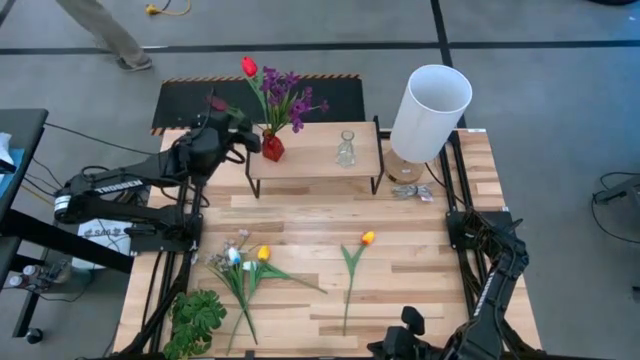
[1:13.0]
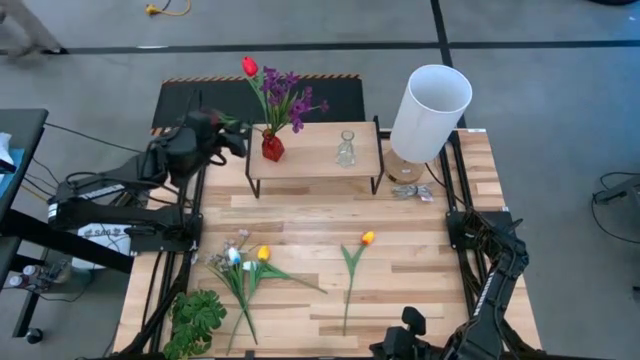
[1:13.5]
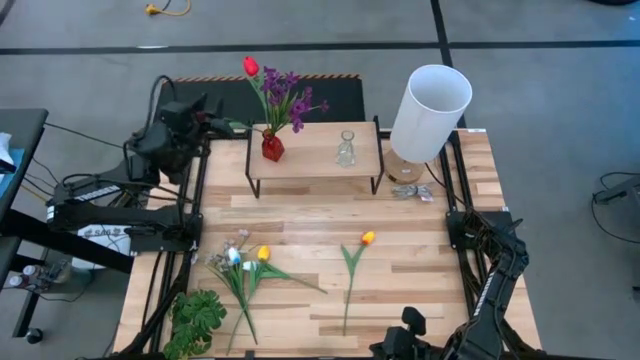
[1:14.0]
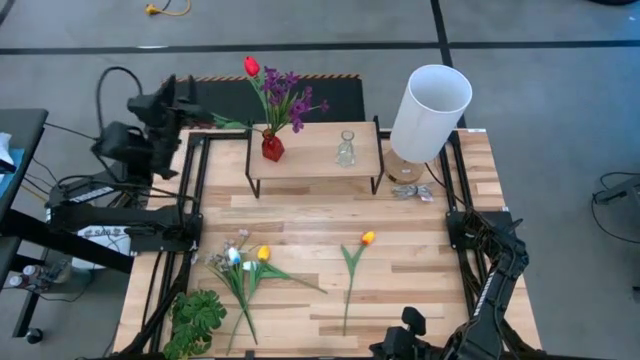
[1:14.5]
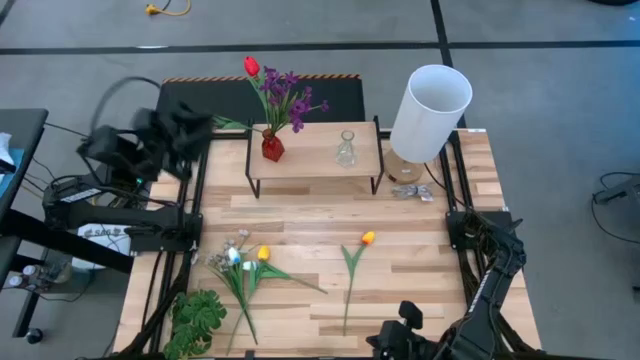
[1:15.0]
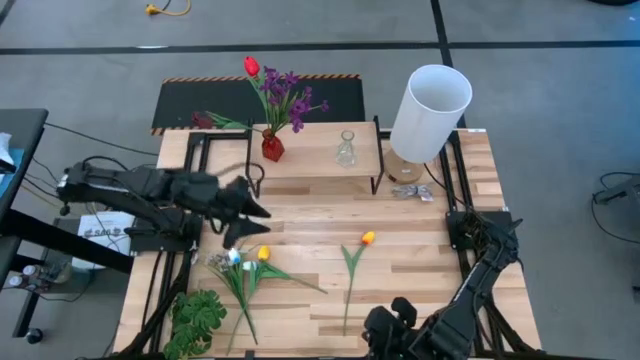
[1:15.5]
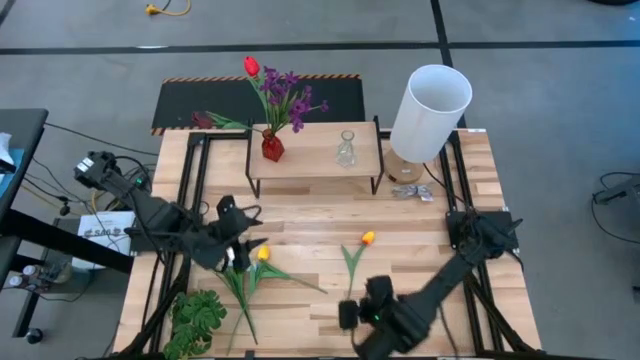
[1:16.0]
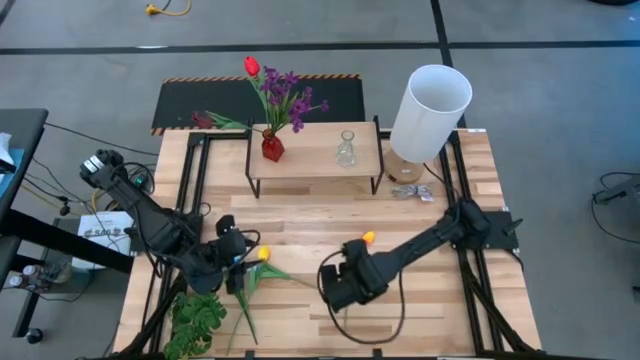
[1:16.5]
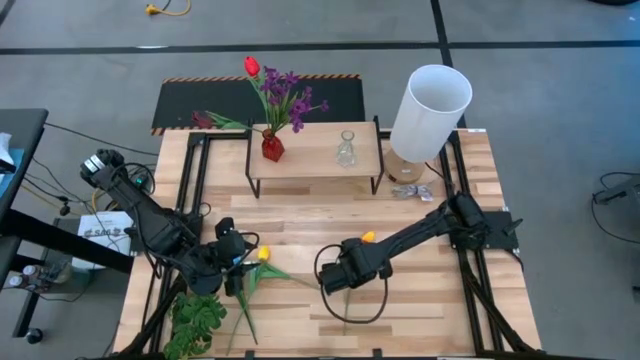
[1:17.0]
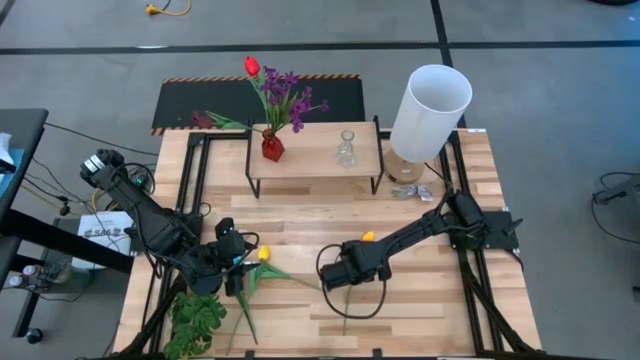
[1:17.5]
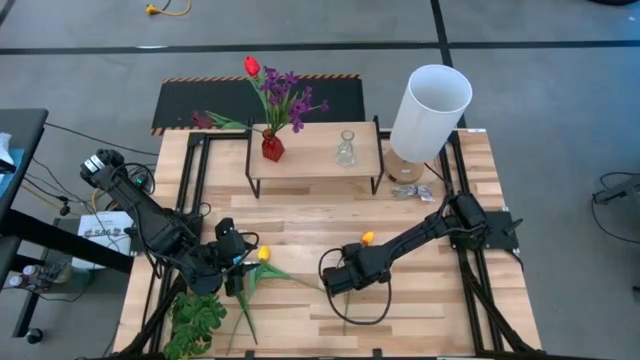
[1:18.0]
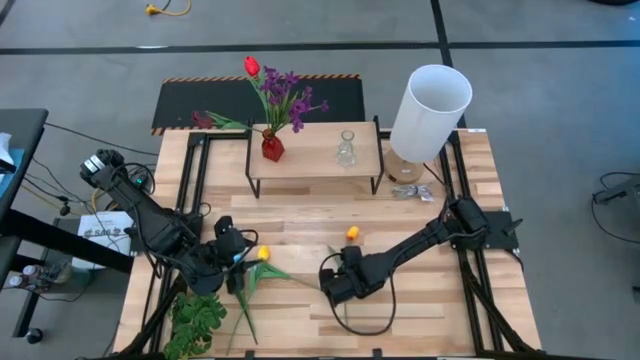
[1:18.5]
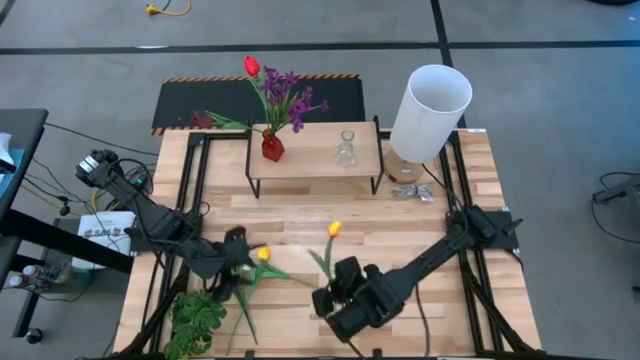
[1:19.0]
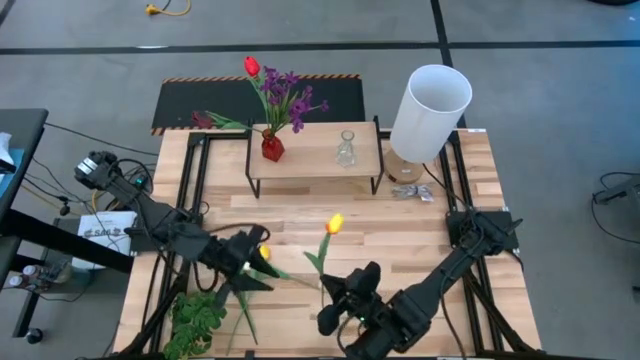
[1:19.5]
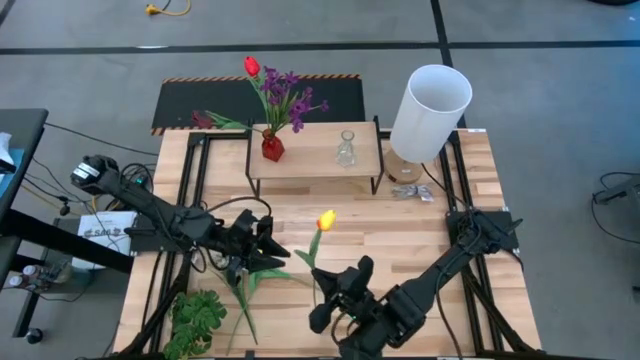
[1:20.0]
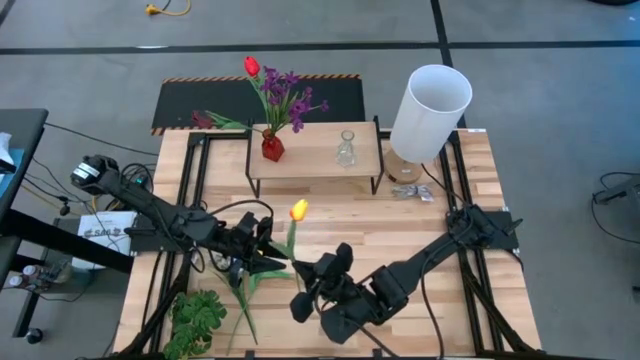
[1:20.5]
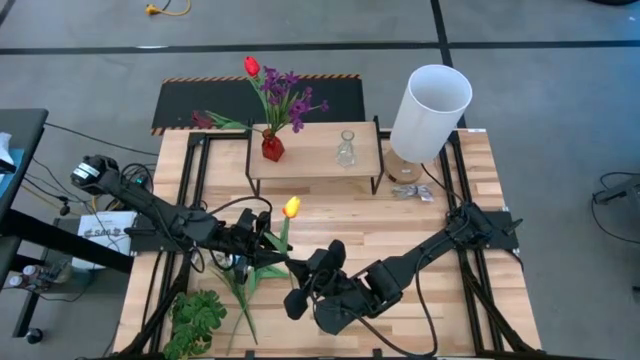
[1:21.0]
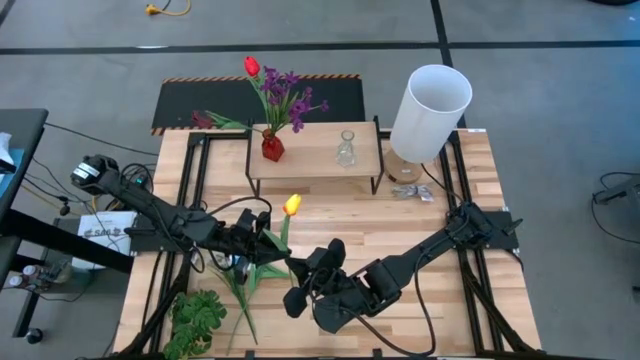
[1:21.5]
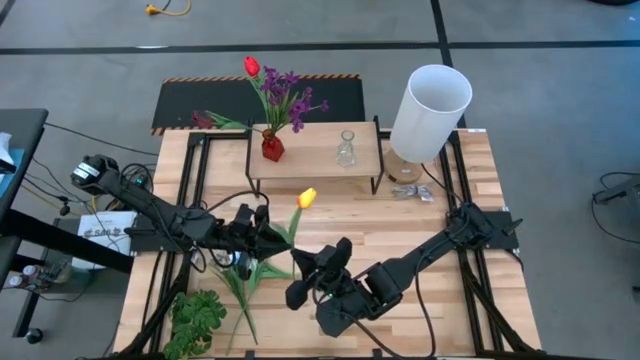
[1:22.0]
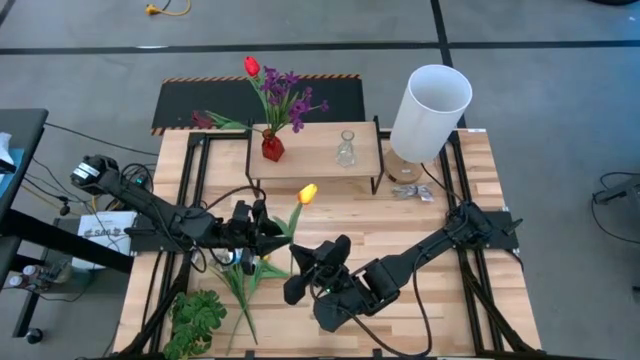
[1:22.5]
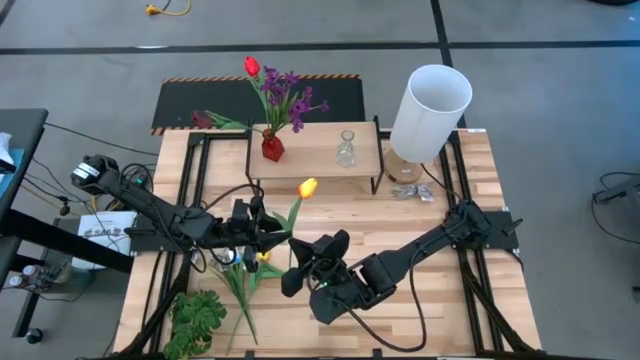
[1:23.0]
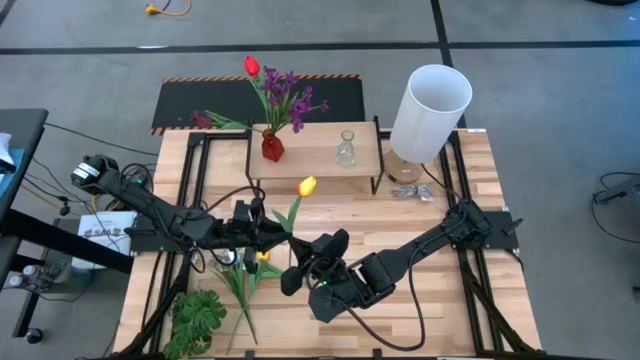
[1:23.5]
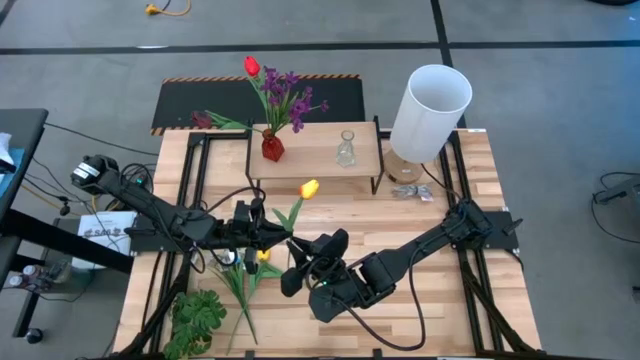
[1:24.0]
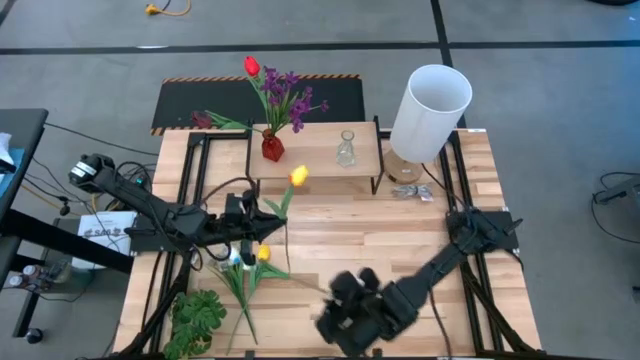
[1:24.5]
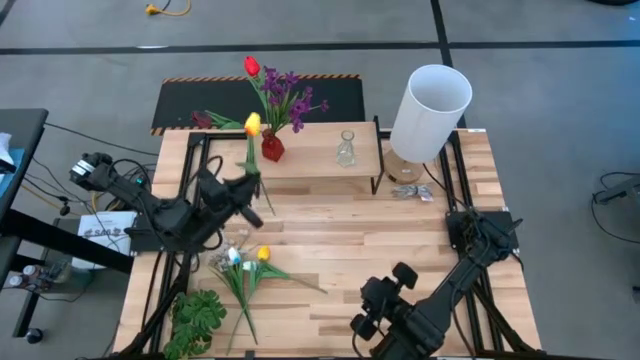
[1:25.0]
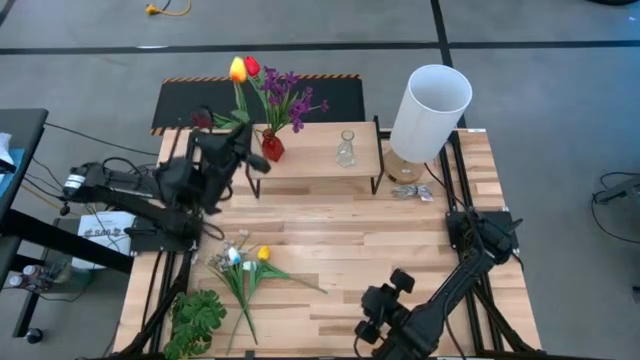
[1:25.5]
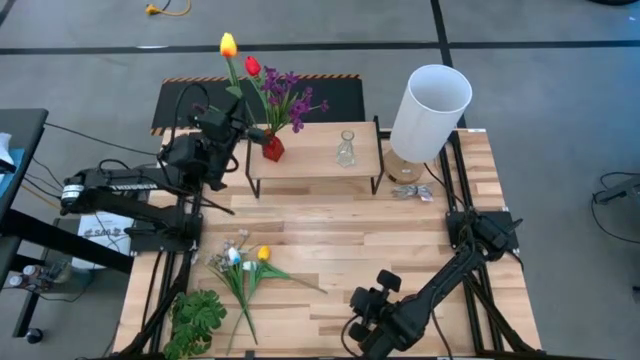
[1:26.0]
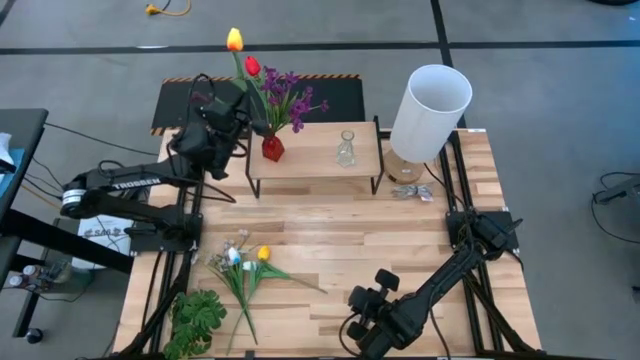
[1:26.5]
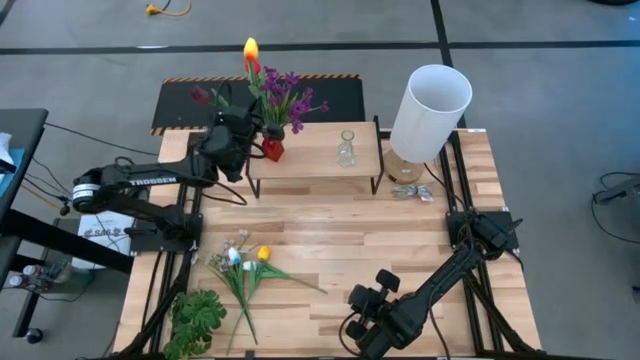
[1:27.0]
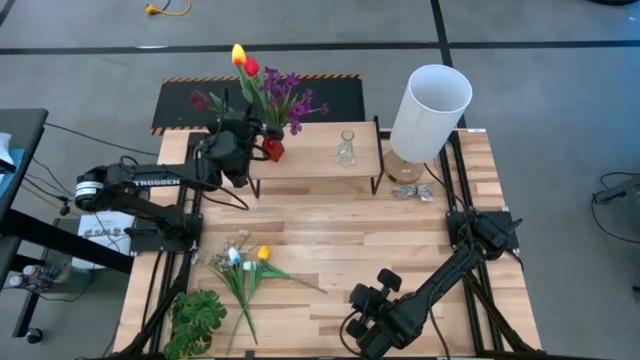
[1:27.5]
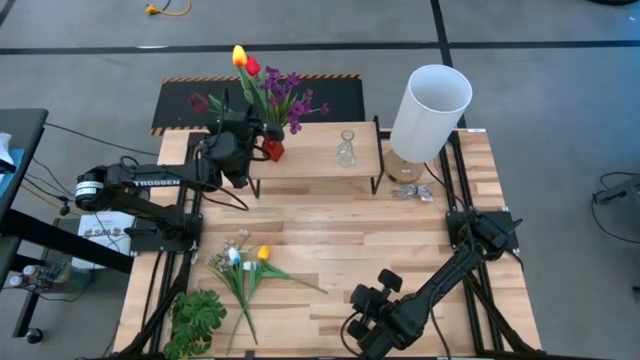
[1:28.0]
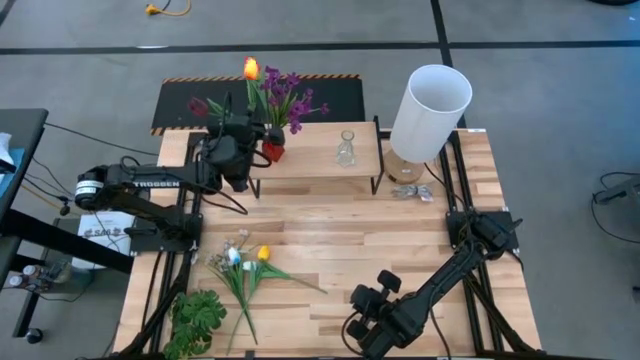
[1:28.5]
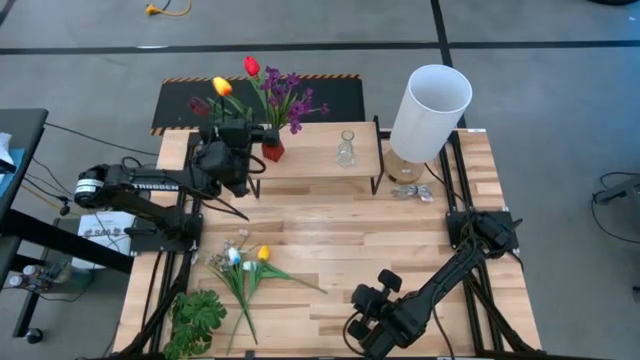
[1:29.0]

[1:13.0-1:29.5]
Task: Pick and place flowers into a vace then onto a shelf
Put the right yellow flower into the red vase on the shelf

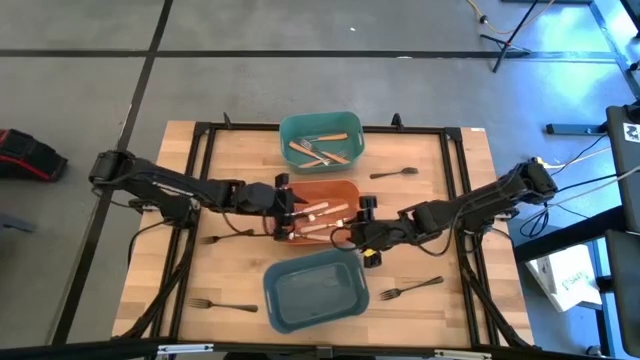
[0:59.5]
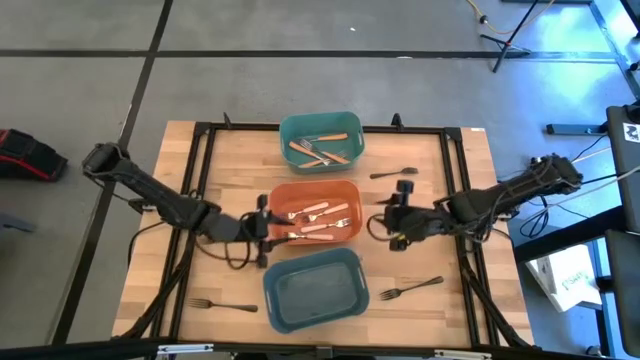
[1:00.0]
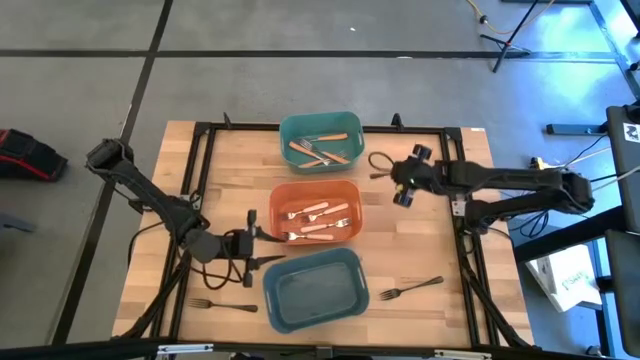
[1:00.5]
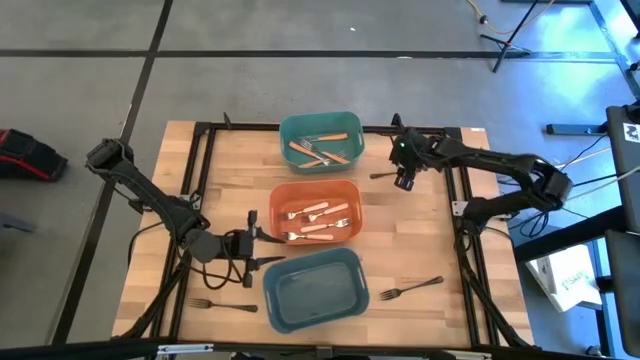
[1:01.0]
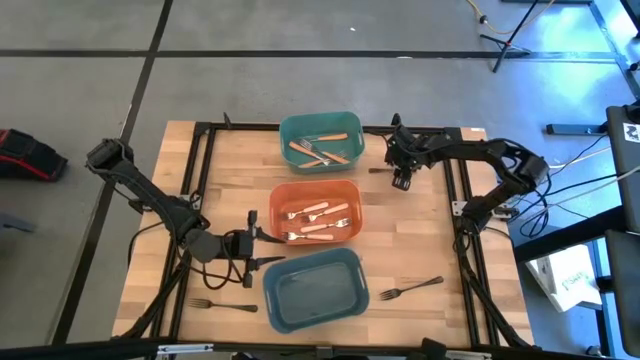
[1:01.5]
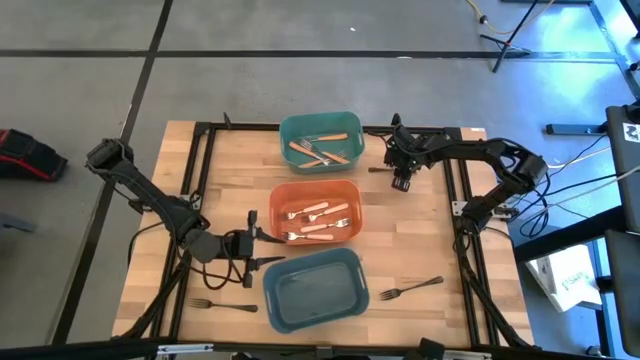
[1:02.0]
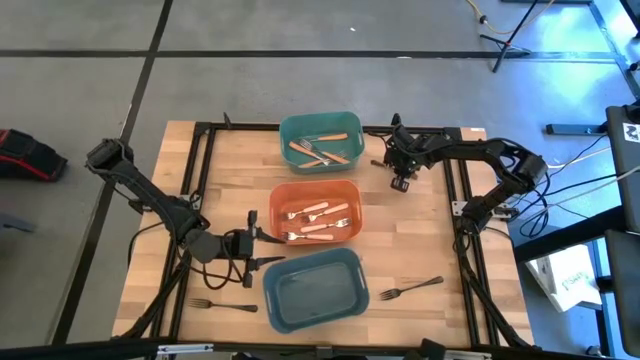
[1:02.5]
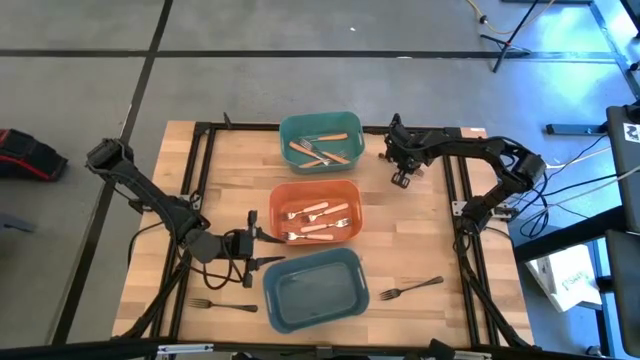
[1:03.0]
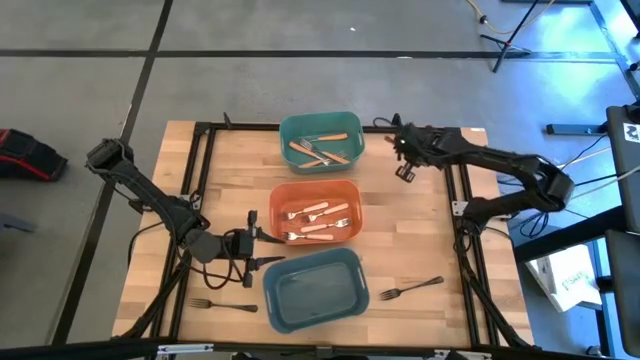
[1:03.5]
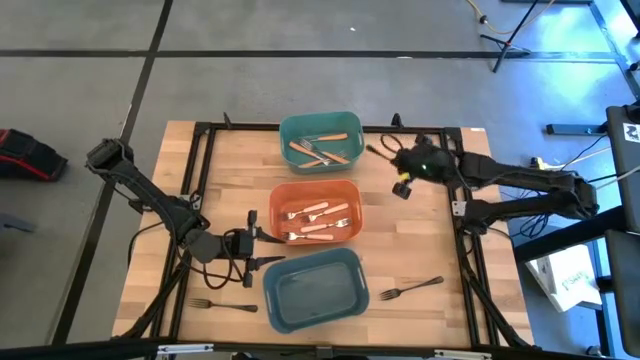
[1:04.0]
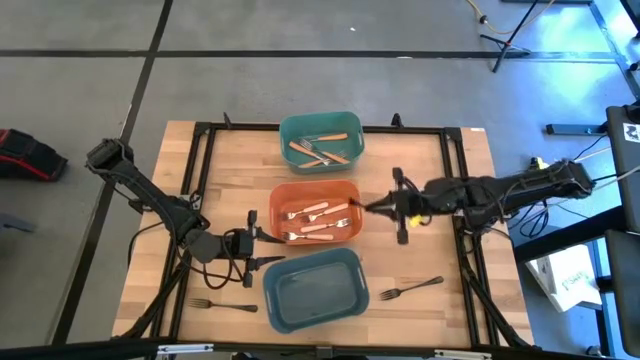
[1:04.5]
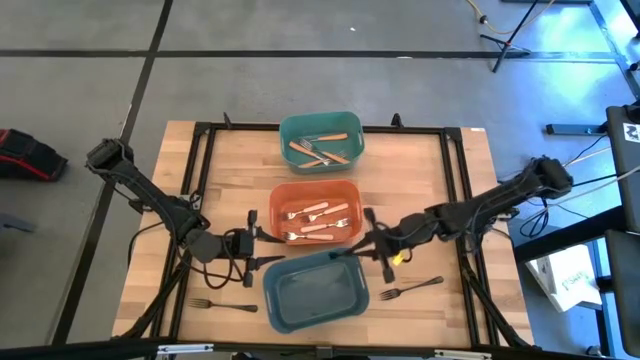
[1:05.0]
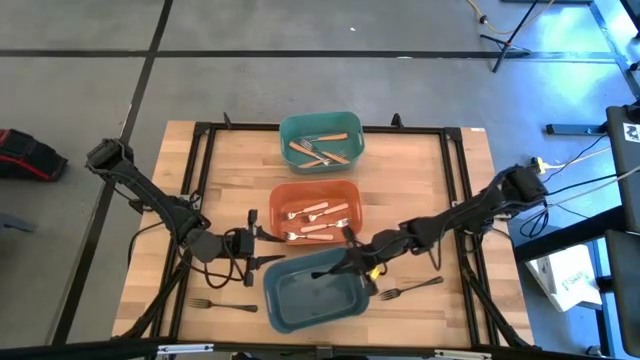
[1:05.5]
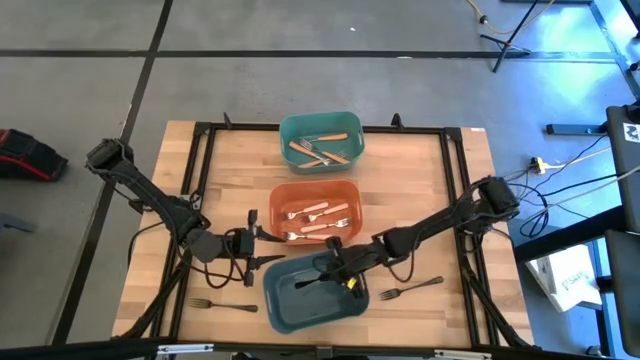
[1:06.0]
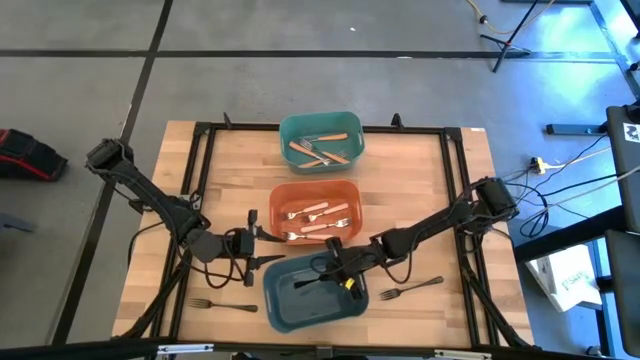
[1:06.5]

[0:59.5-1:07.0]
Task: Sort silverware by color (type)
Put the black fork into the blue bin
